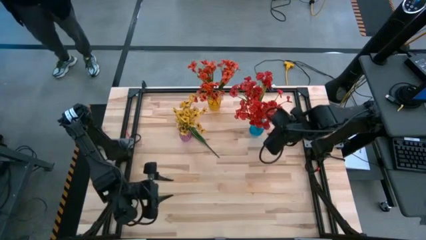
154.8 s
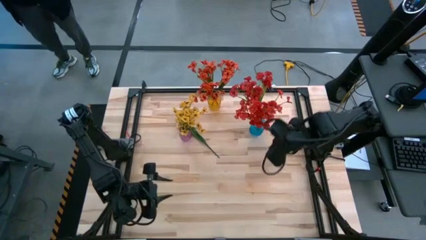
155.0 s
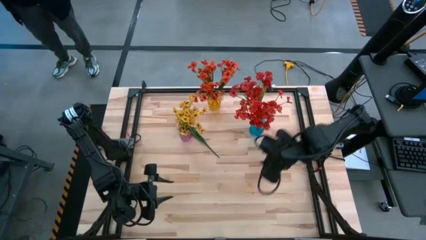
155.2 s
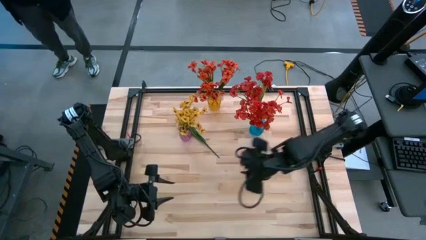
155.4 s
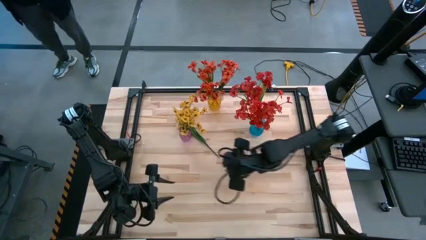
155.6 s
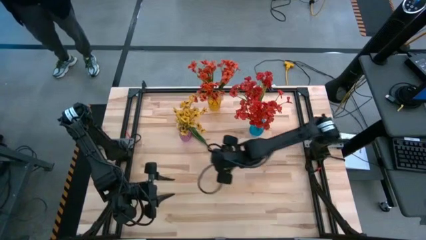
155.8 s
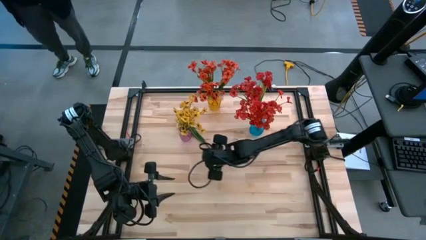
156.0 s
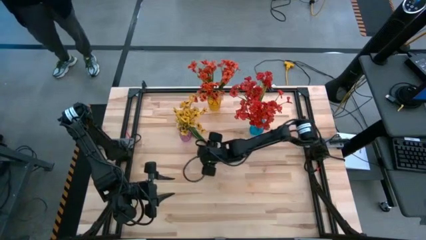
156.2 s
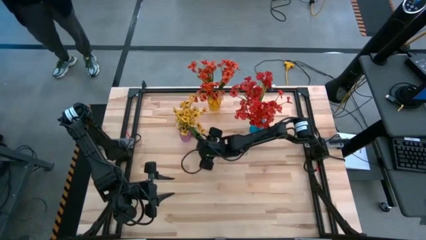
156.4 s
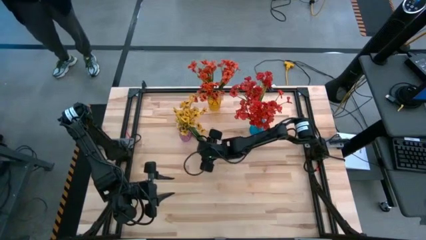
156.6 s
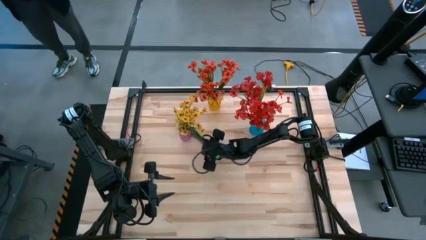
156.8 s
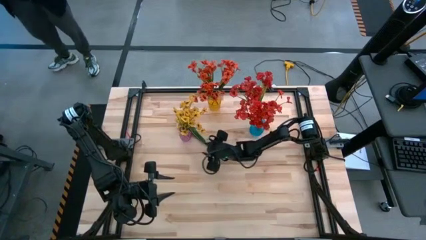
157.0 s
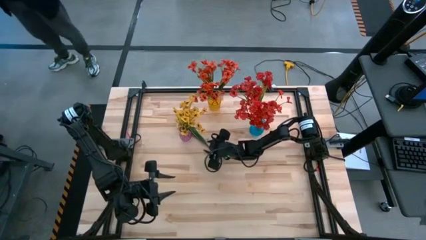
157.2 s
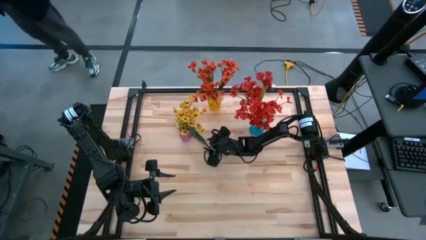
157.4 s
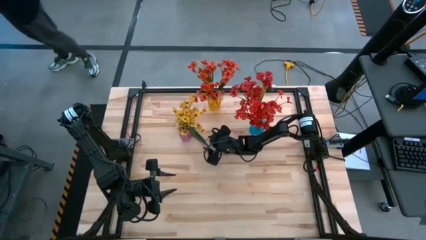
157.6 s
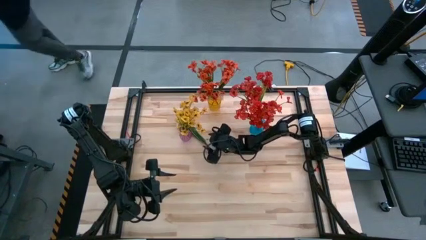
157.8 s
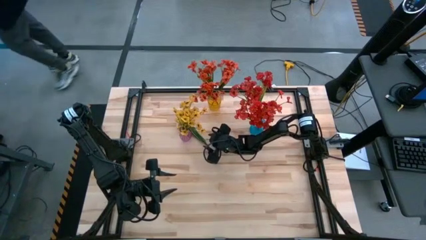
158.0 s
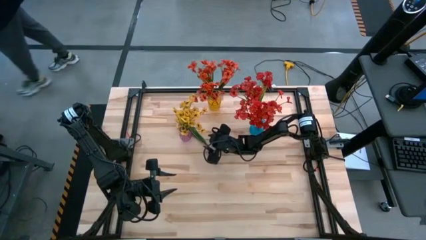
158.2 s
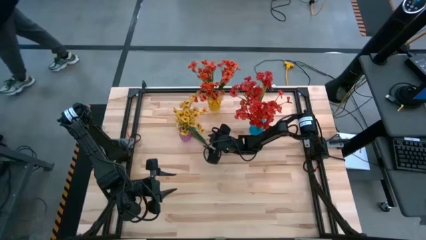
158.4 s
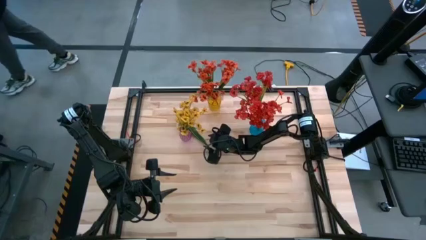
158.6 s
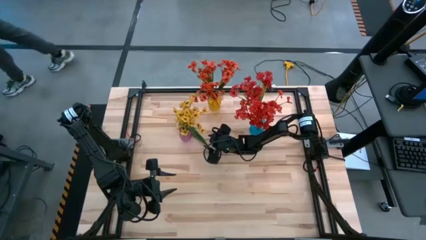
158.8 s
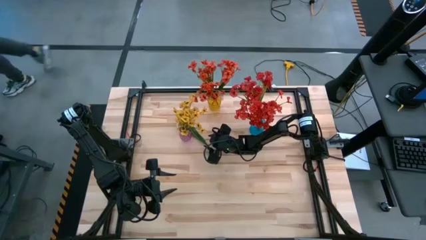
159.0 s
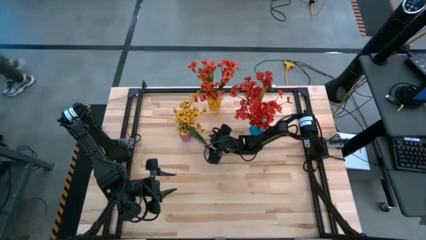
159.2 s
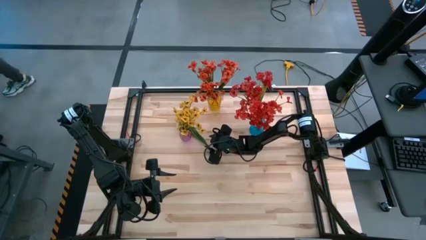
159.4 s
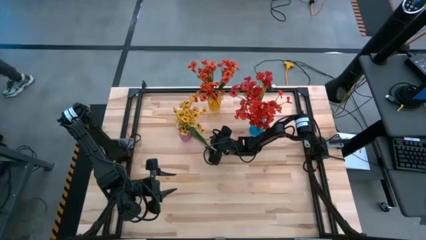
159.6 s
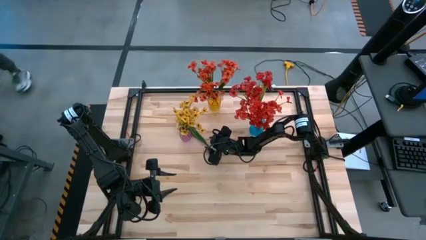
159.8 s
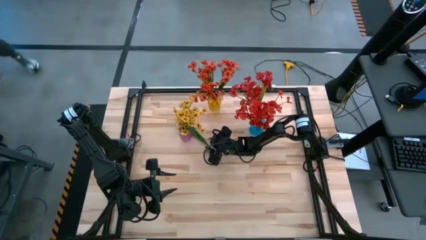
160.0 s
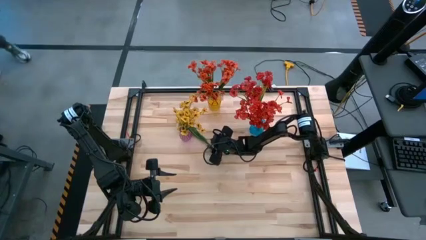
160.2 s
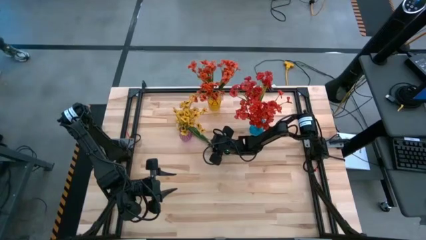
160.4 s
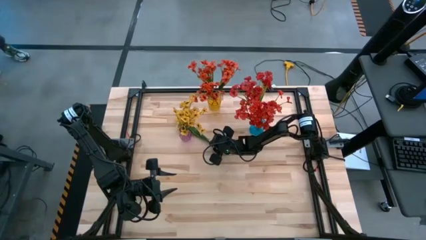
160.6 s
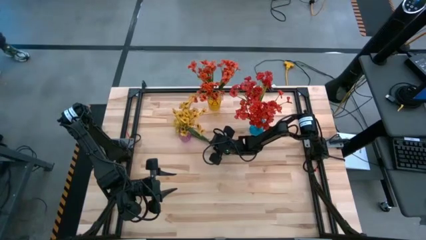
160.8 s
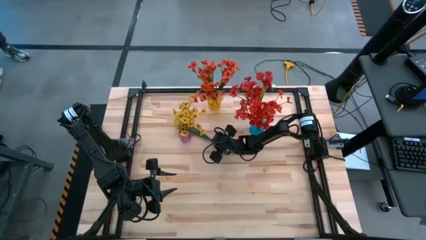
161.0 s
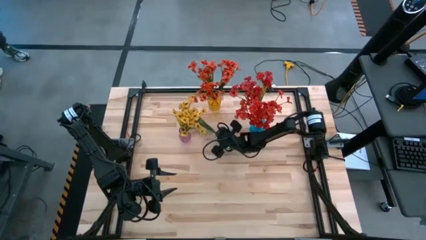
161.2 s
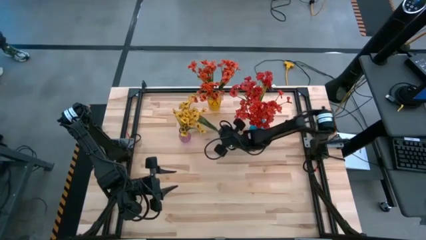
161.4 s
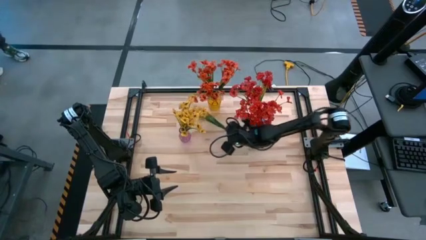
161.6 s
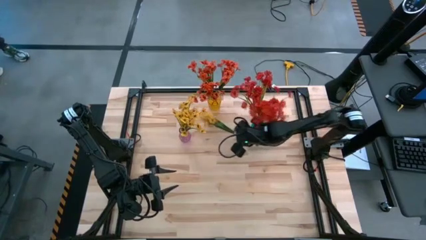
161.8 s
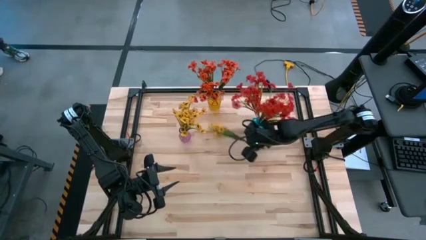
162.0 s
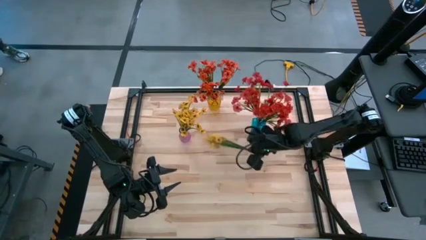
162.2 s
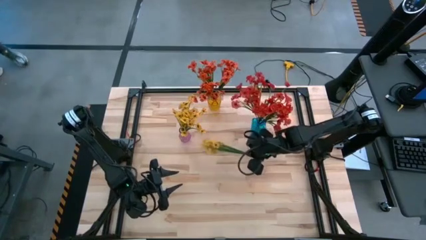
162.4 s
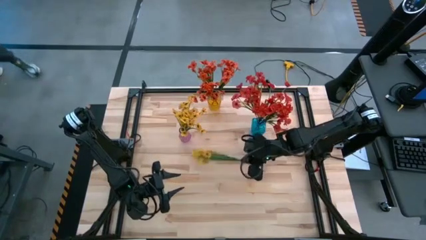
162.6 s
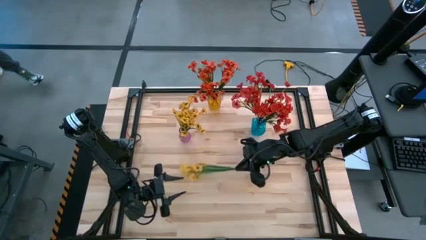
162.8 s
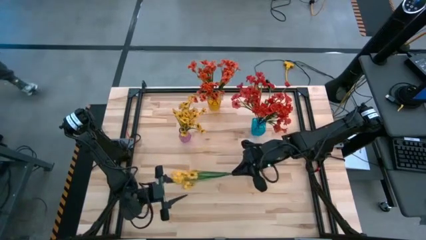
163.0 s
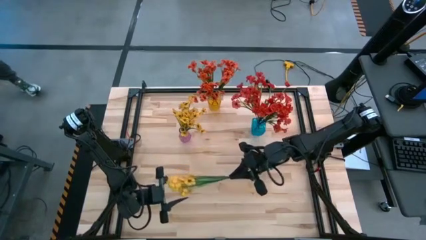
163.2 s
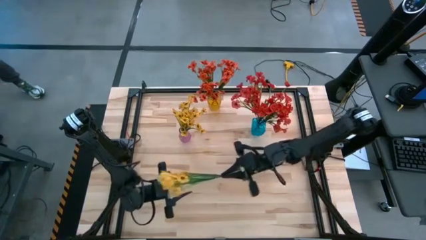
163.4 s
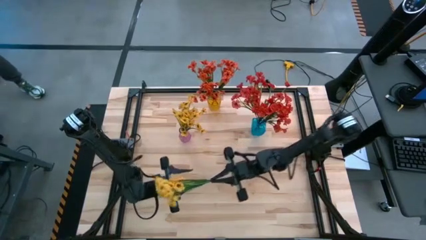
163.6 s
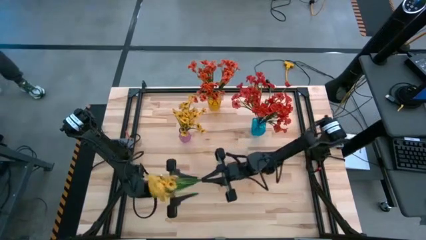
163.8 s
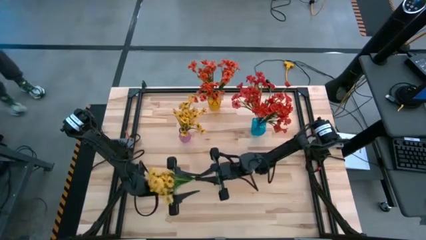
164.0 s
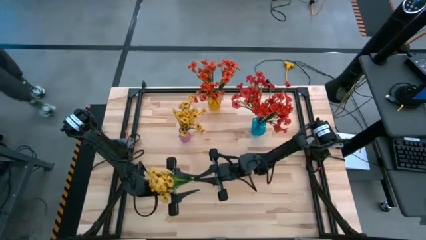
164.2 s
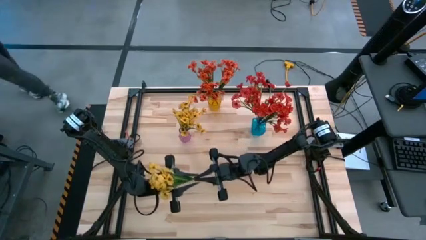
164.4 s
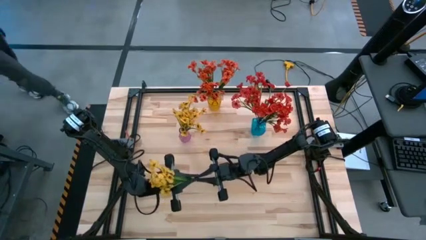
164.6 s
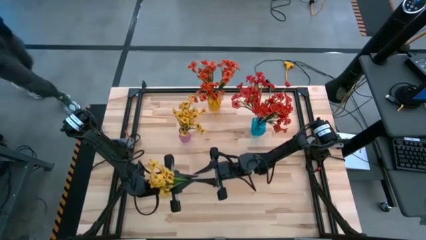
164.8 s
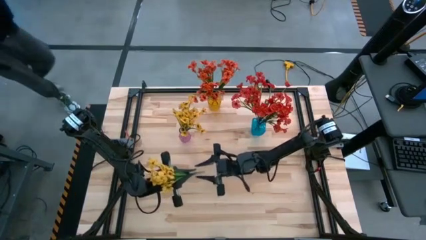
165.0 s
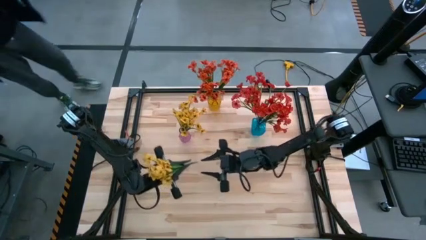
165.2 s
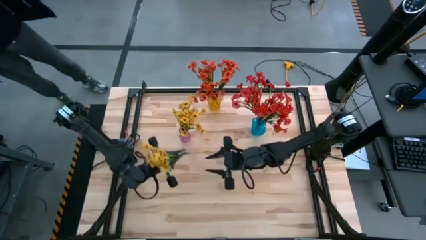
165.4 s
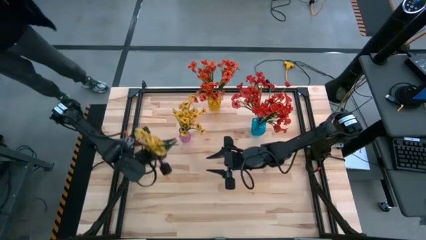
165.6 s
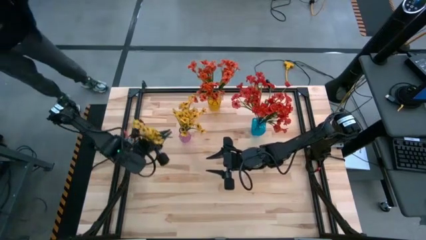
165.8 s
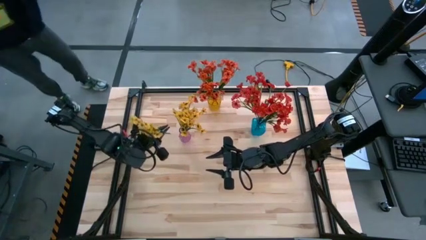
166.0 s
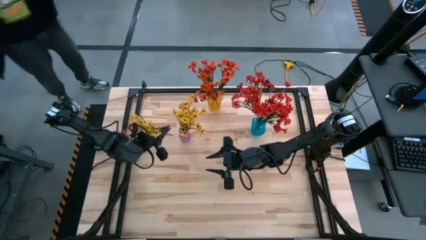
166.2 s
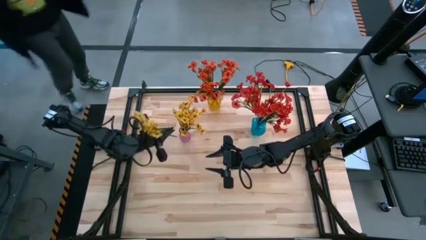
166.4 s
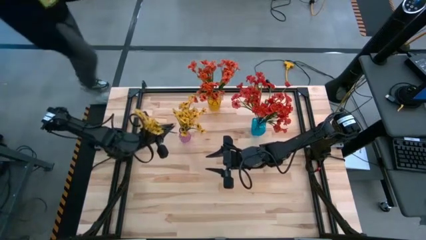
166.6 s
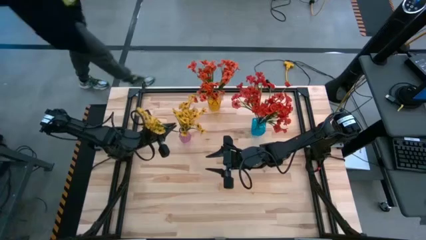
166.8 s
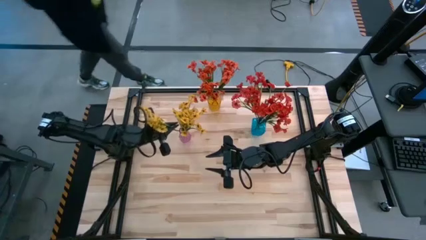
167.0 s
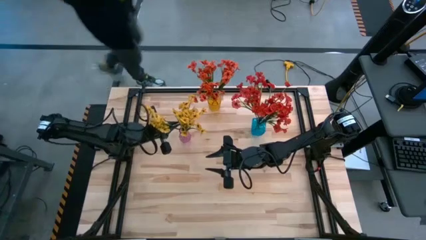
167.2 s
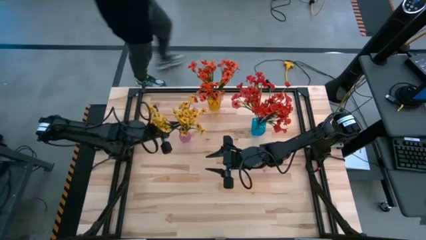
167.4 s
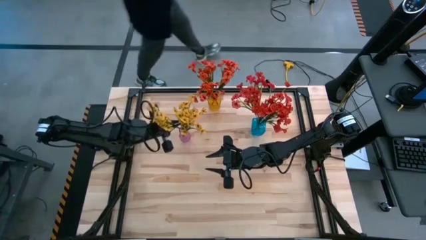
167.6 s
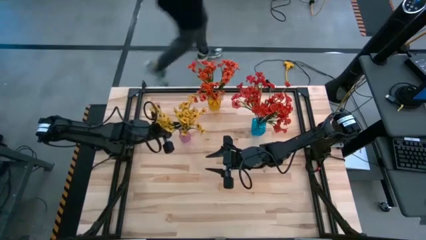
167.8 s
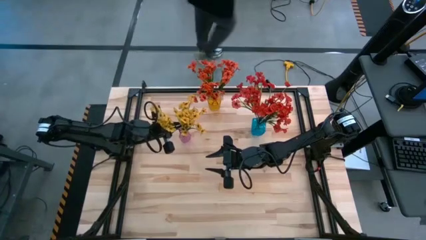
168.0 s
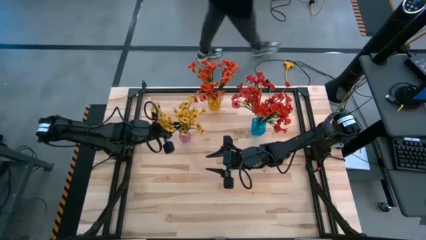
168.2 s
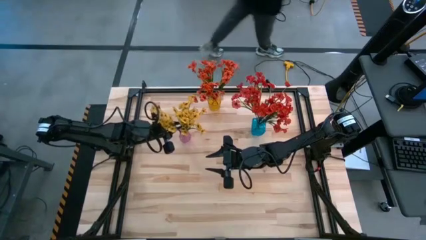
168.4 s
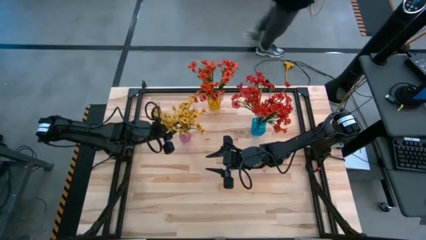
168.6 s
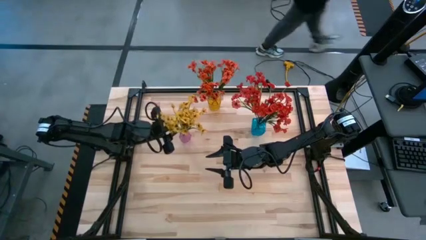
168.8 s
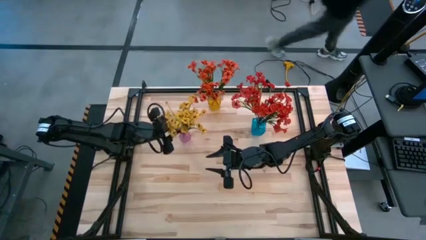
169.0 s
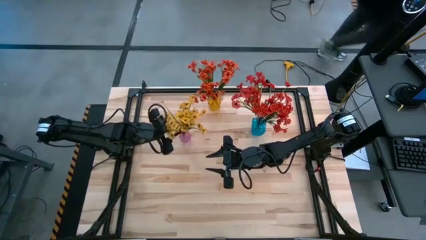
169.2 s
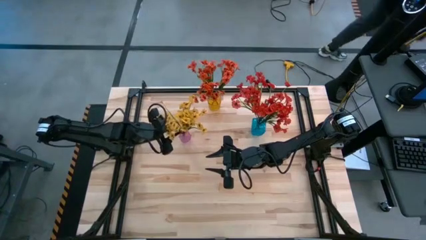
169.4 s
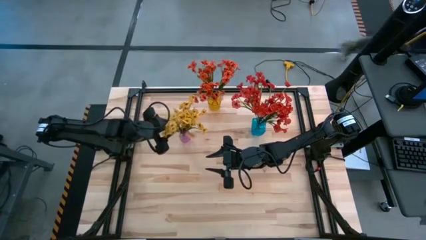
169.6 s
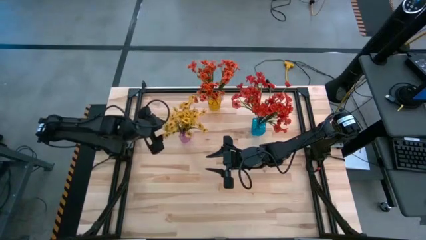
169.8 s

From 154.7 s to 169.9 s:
Task: Sort flowers into vase by color
Put the yellow flower into the purple vase

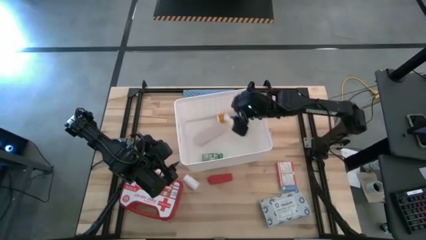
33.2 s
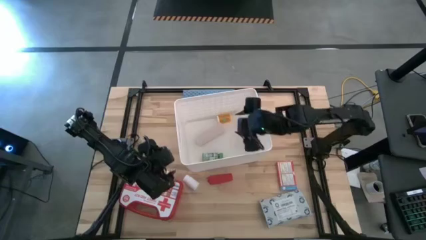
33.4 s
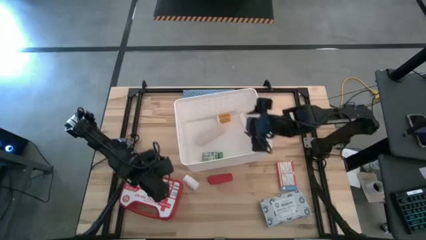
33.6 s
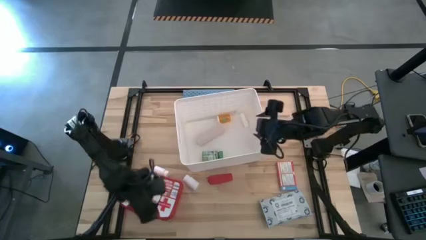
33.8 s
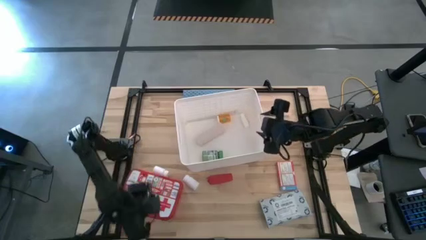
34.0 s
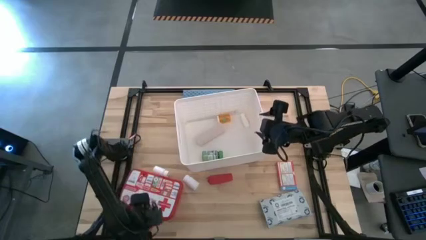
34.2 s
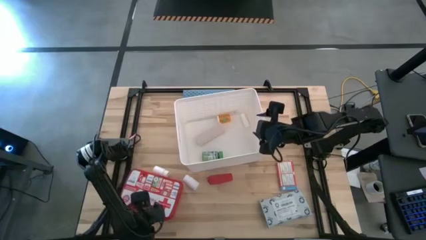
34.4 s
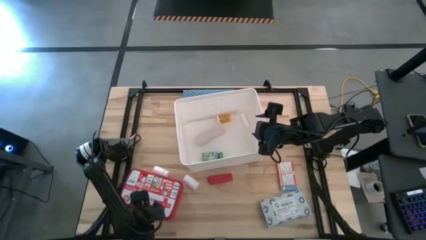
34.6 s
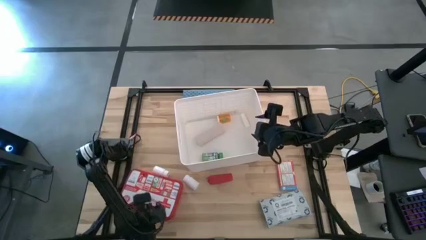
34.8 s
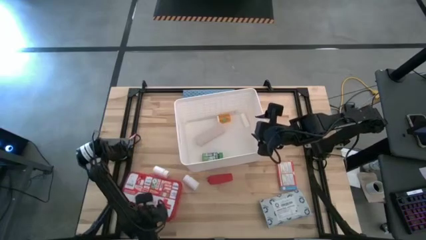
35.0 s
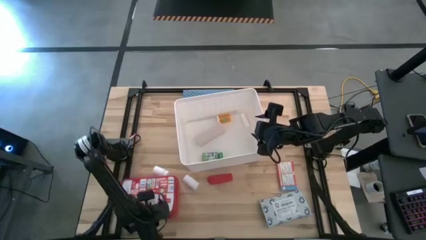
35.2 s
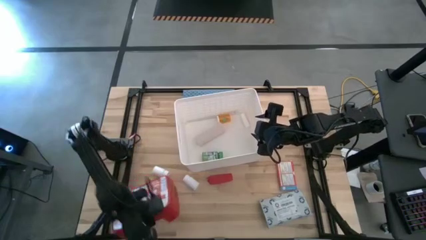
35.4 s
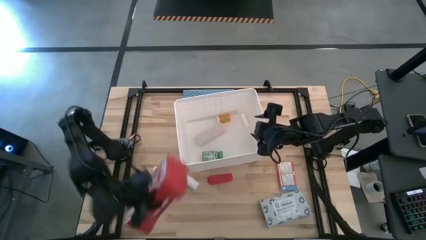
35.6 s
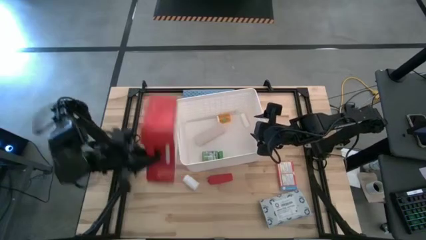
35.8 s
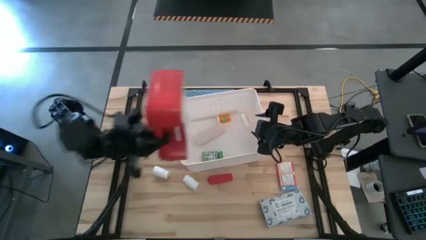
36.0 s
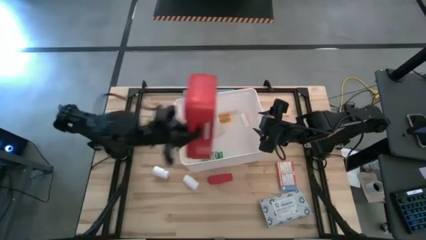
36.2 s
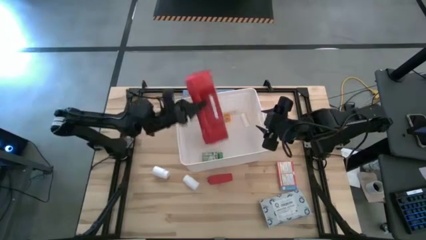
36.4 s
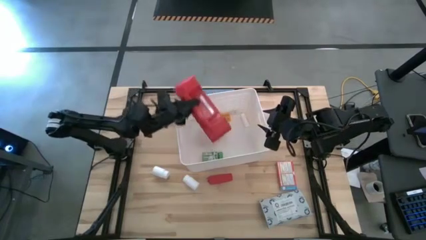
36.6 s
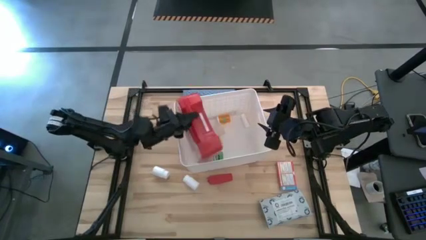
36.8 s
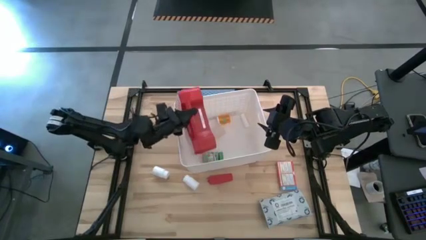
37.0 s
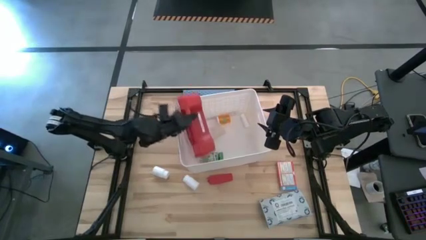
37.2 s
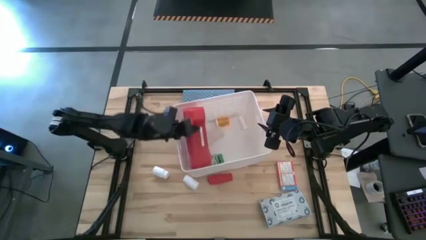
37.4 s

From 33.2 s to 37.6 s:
Task: Pick & place medical supplies in basket/bin
Put the red first aid kit into the white basket
